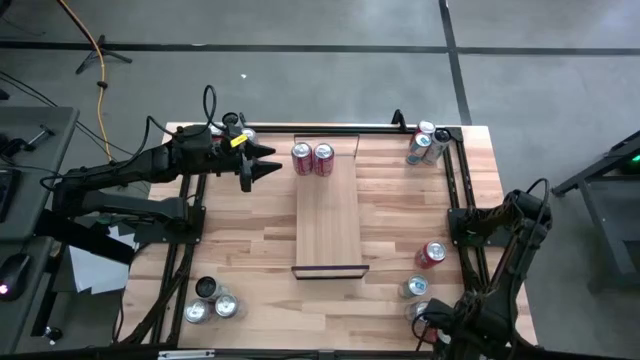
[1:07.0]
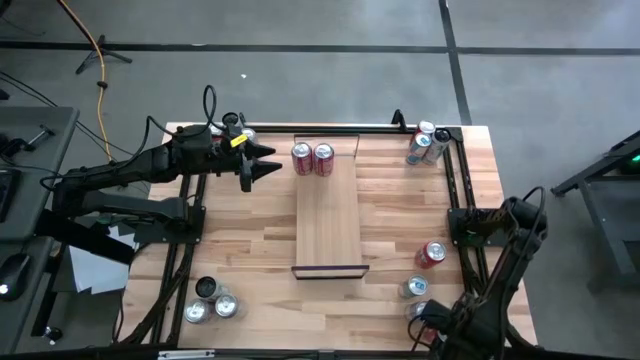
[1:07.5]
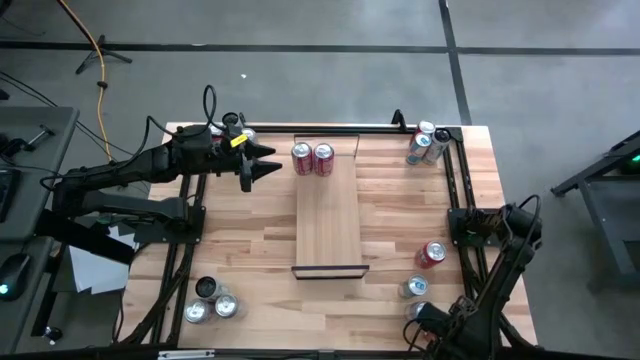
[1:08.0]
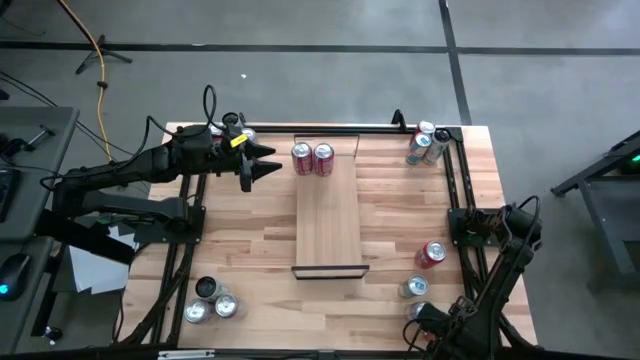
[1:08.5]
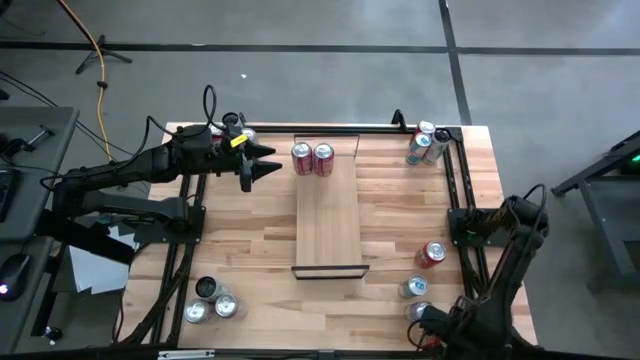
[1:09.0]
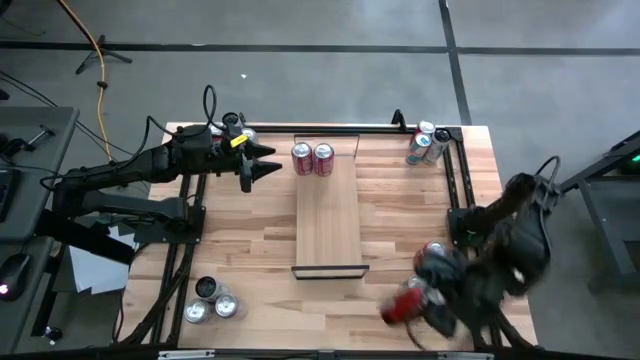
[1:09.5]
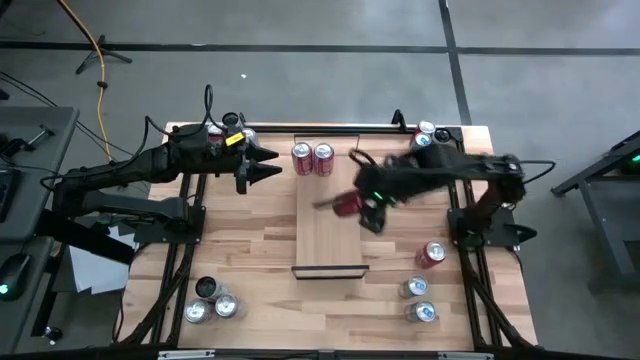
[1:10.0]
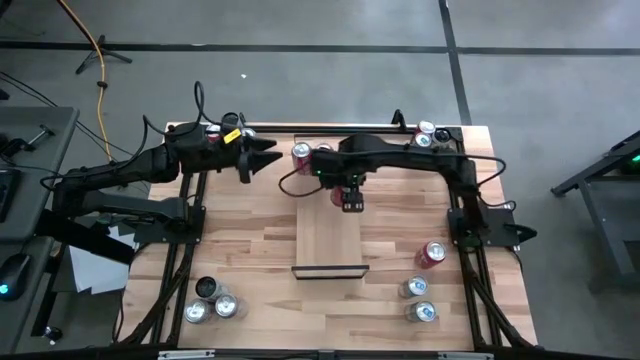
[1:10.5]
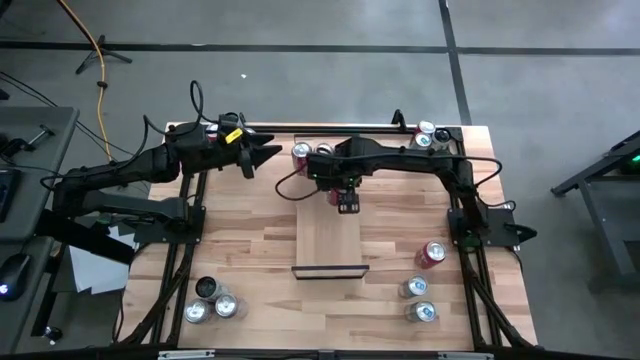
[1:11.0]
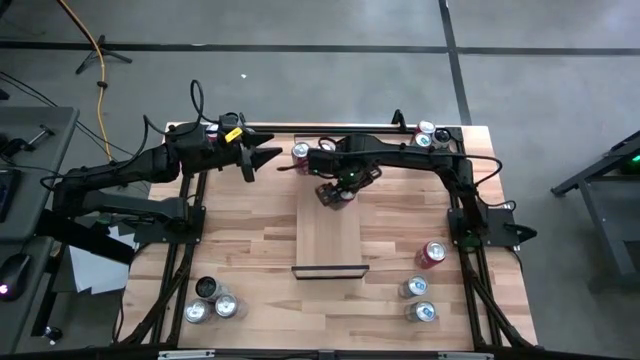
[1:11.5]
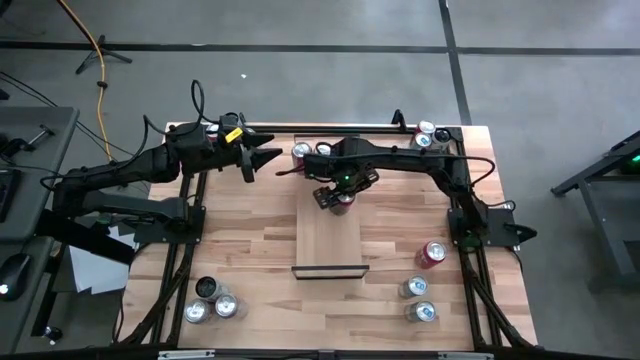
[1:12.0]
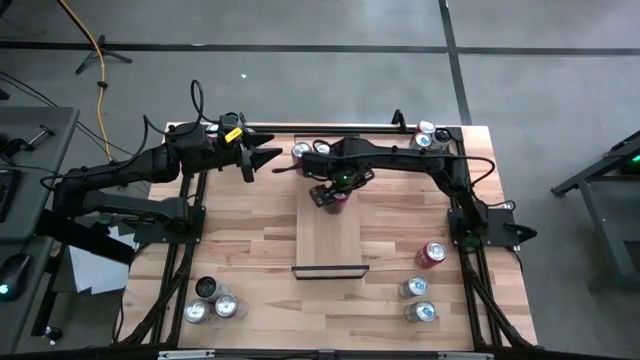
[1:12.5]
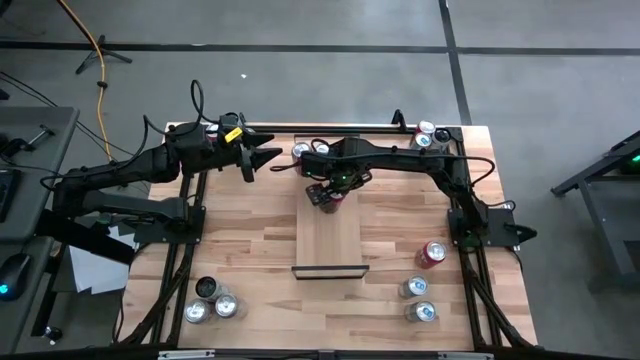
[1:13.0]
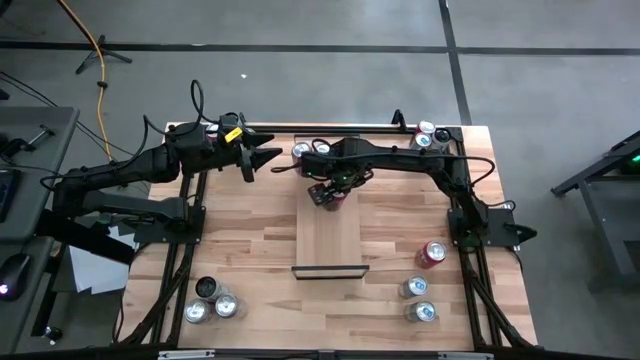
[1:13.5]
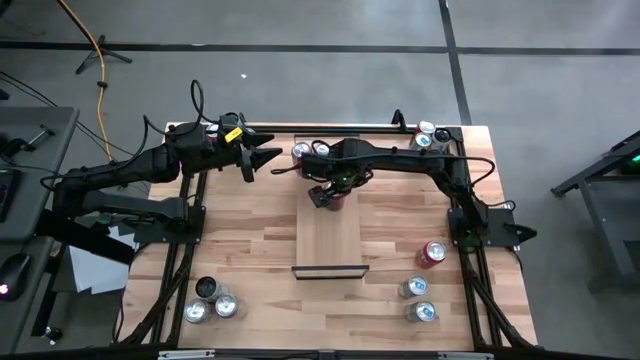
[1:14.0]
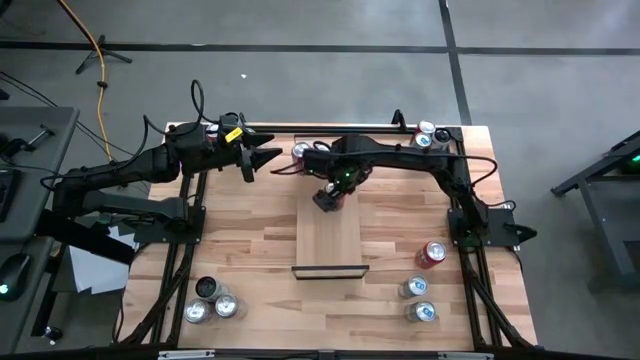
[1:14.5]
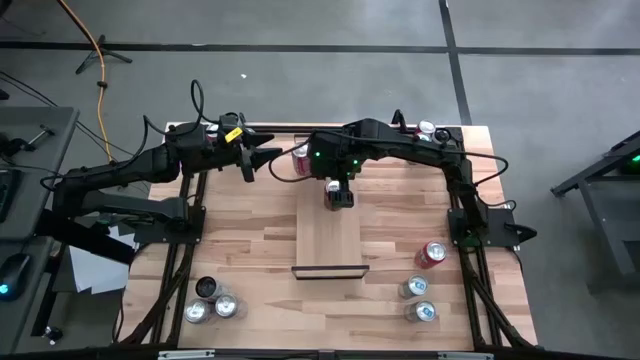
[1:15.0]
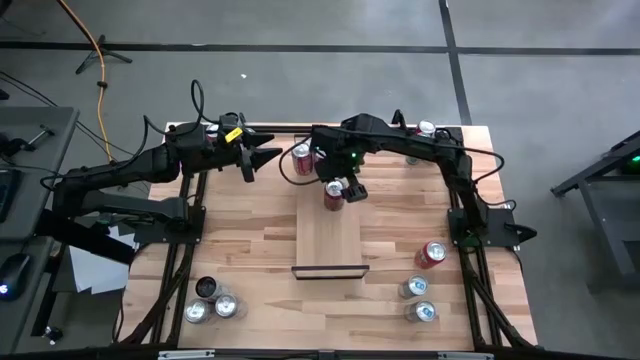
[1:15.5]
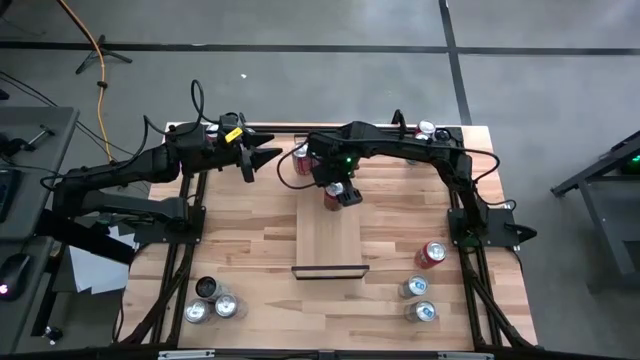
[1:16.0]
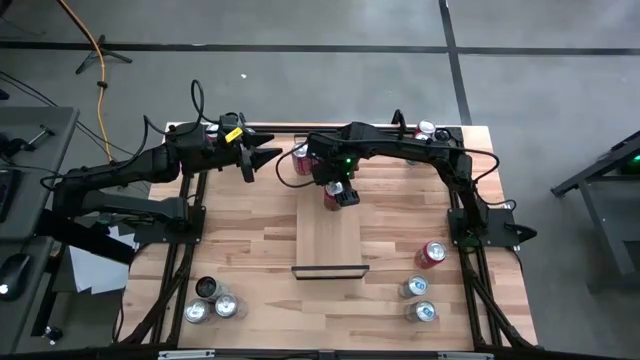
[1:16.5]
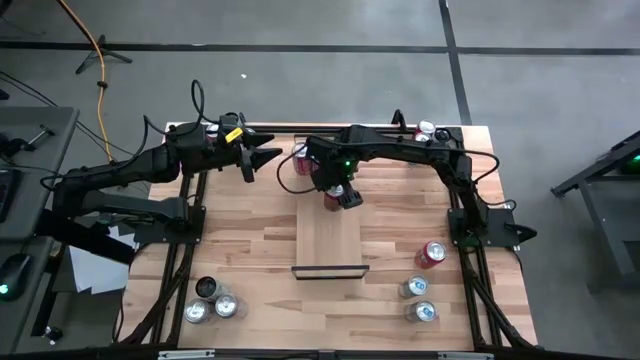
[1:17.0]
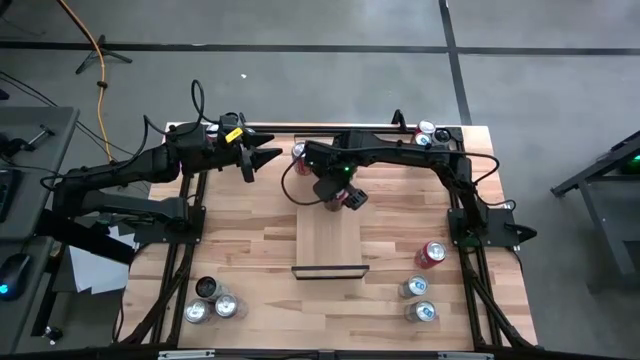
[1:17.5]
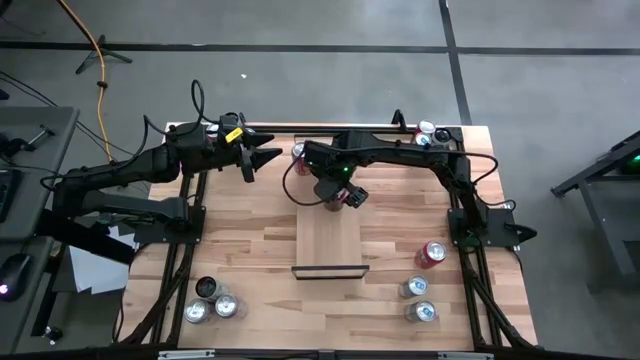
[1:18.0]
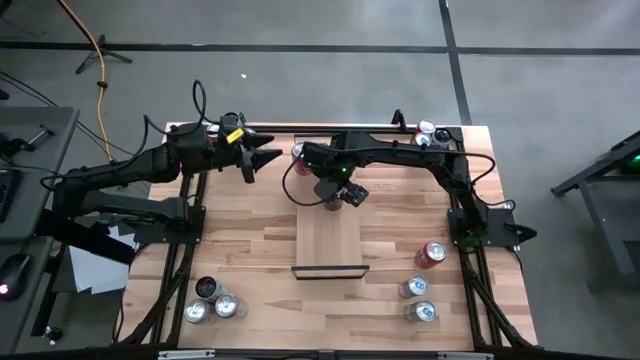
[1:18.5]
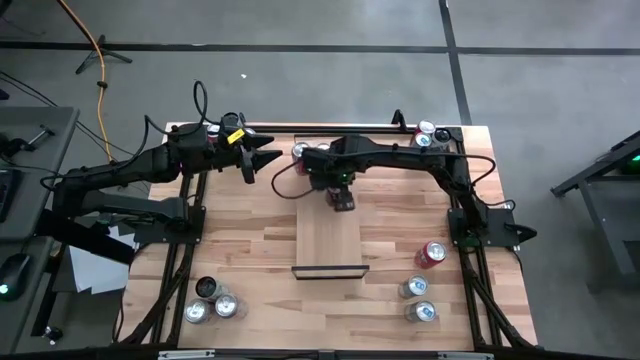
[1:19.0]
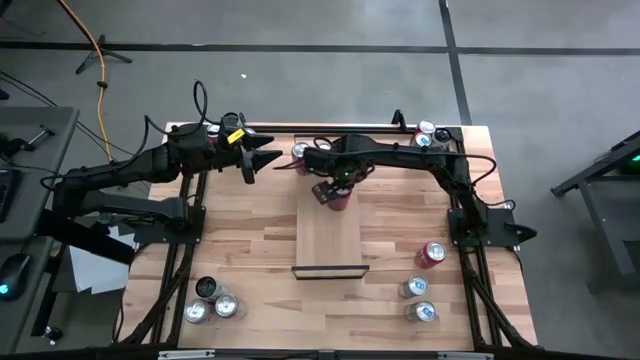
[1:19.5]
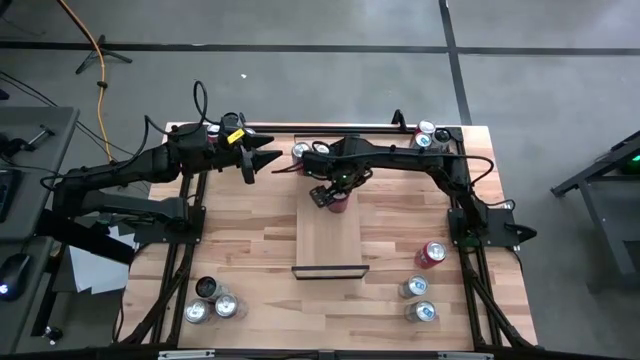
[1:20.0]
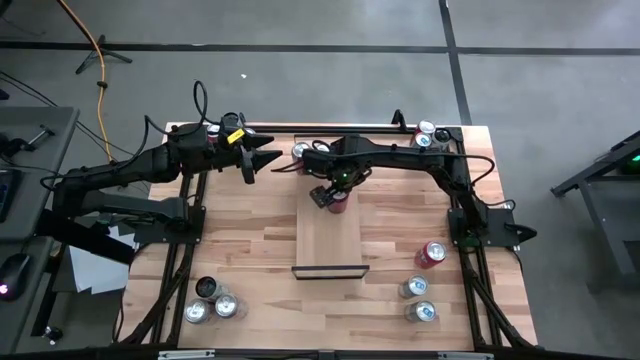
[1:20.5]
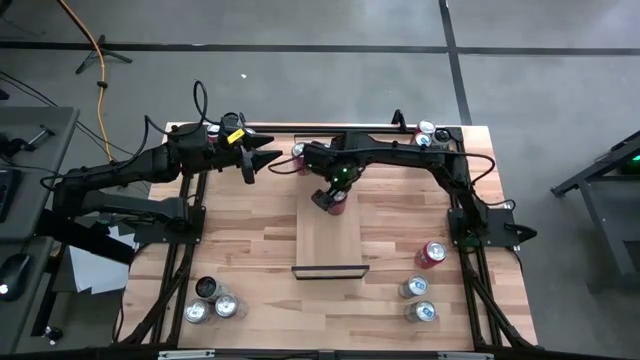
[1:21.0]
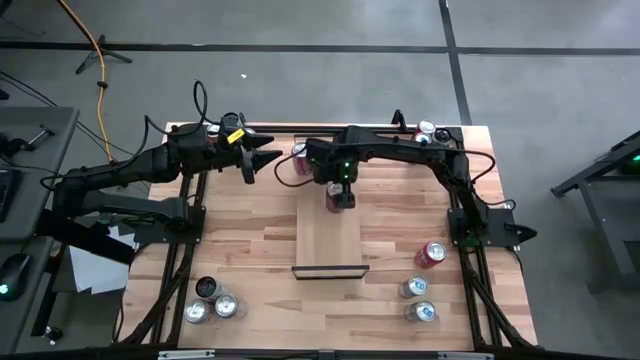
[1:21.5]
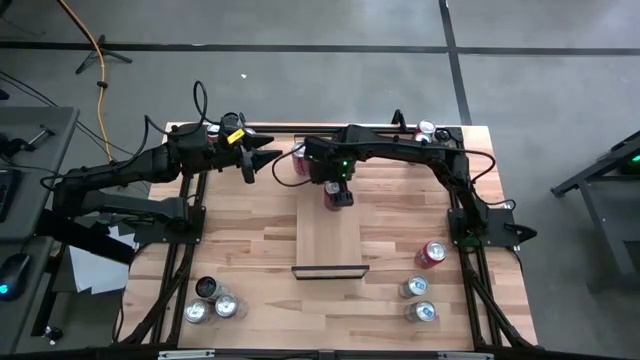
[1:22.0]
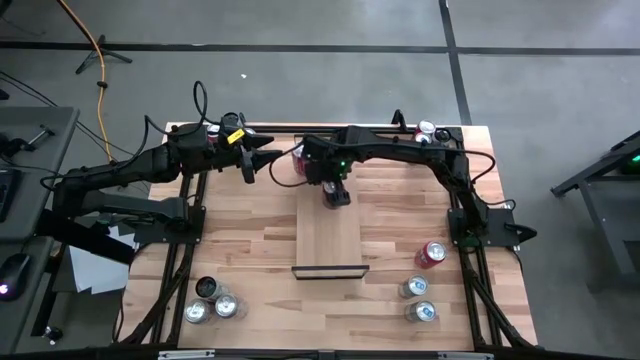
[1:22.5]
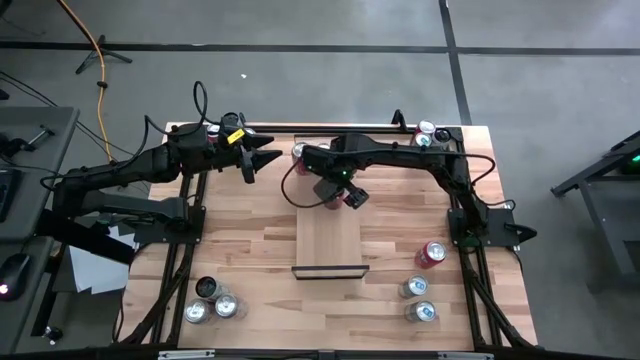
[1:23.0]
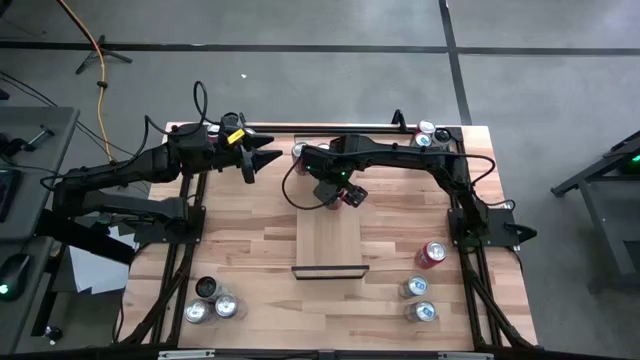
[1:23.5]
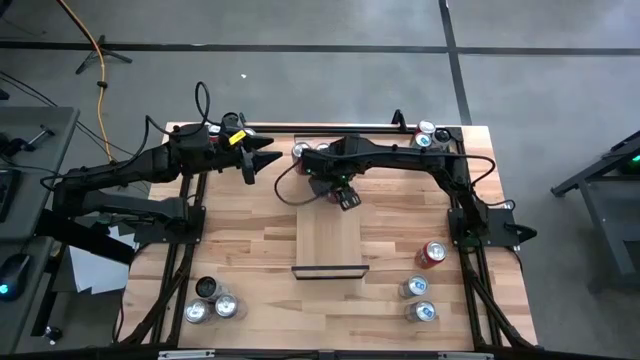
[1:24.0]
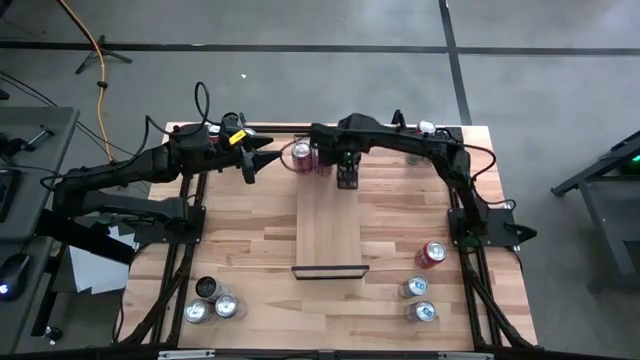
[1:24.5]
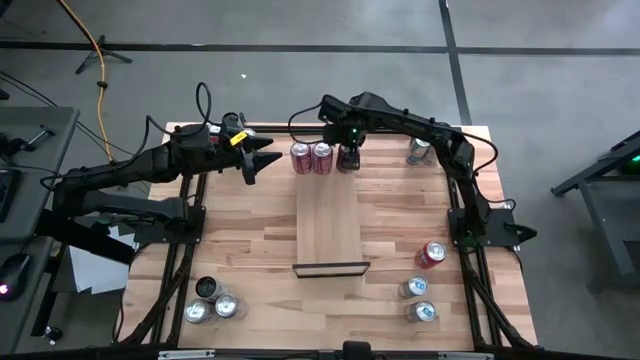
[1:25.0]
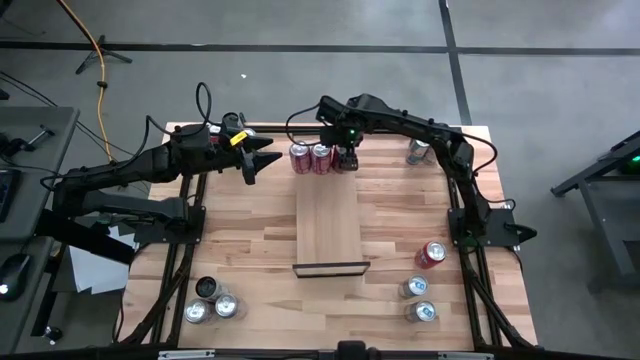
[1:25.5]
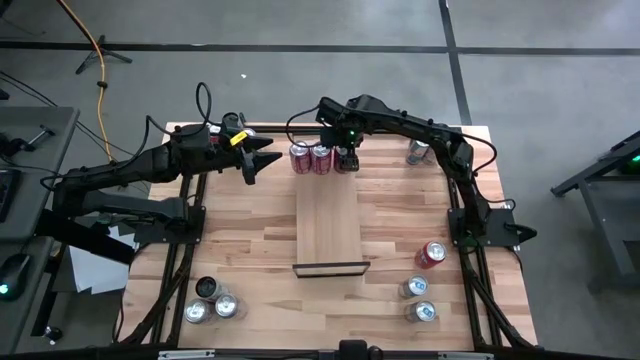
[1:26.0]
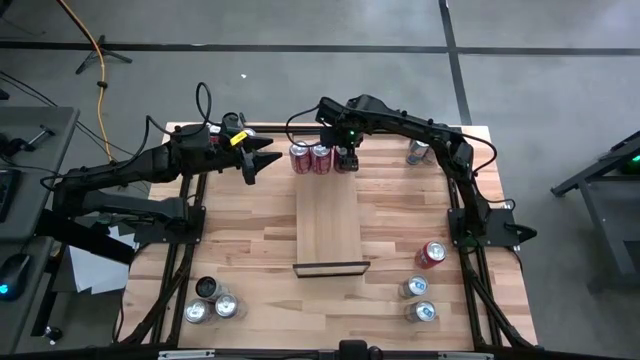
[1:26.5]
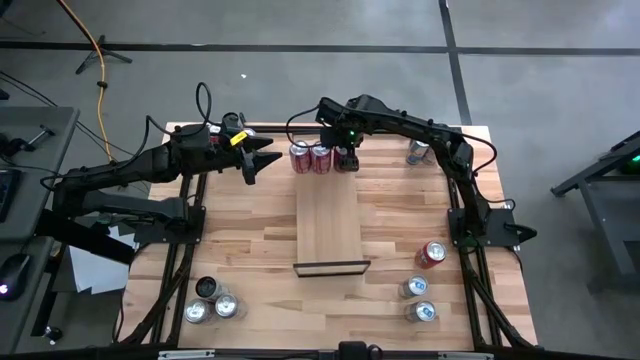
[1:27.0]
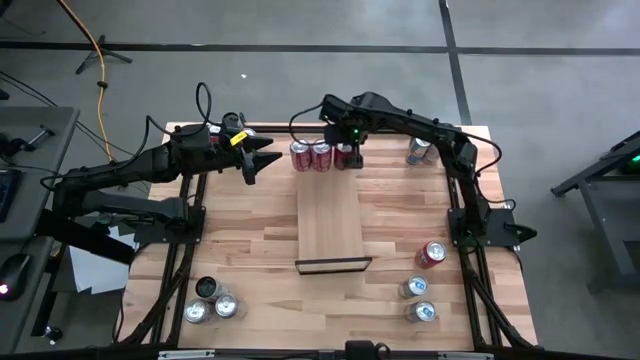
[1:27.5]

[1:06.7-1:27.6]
Task: Place canned beverage on shelf
Put the red soda can on the shelf aligned with the other red soda can
